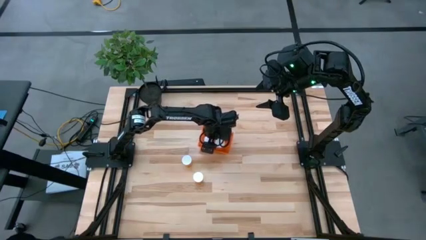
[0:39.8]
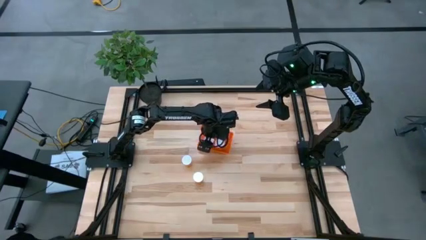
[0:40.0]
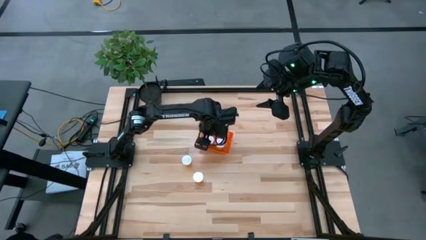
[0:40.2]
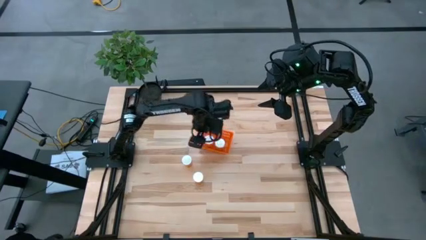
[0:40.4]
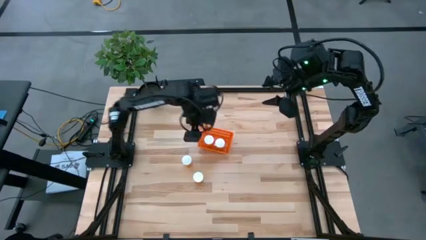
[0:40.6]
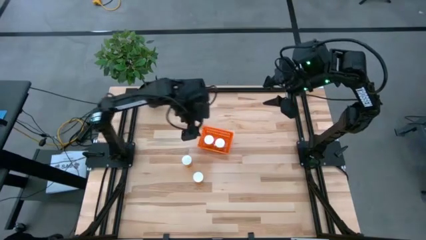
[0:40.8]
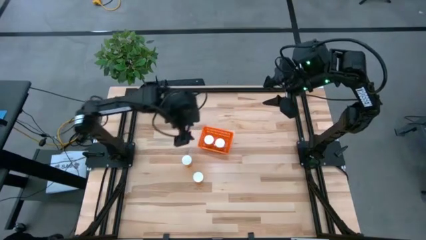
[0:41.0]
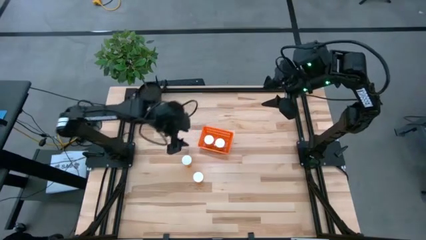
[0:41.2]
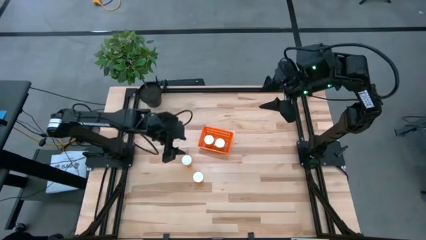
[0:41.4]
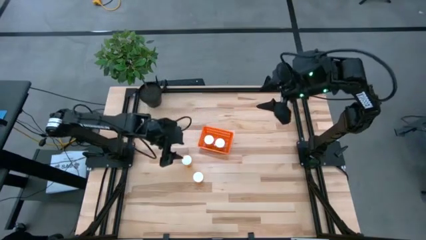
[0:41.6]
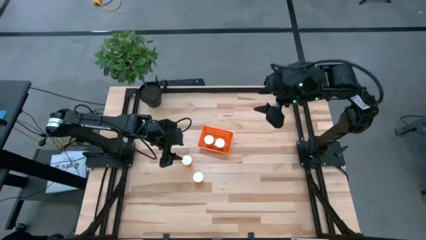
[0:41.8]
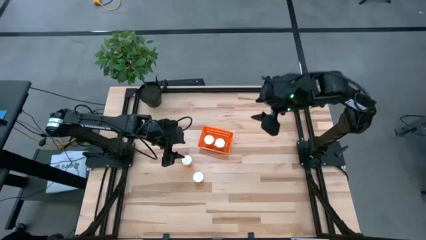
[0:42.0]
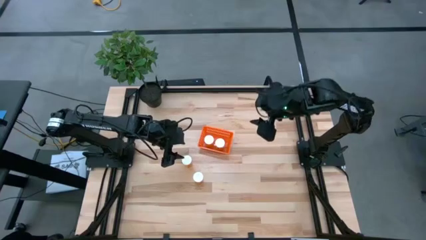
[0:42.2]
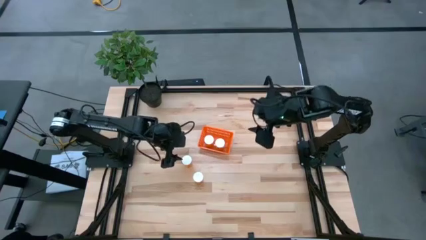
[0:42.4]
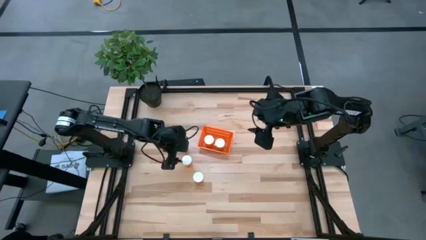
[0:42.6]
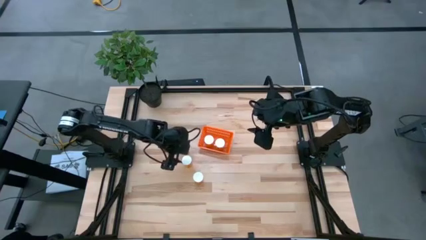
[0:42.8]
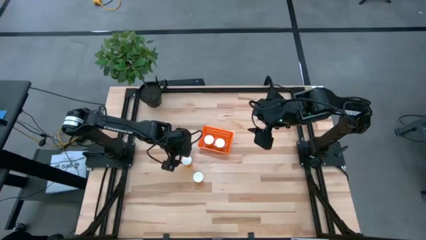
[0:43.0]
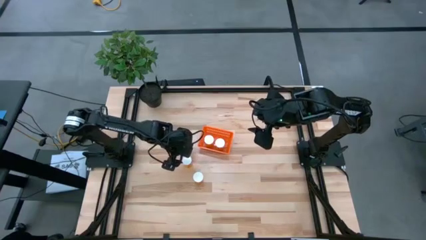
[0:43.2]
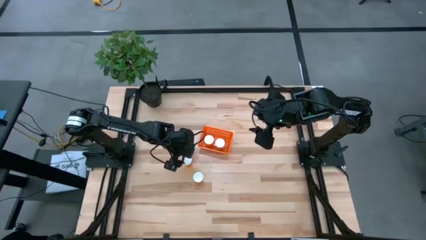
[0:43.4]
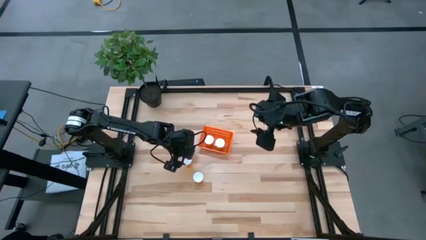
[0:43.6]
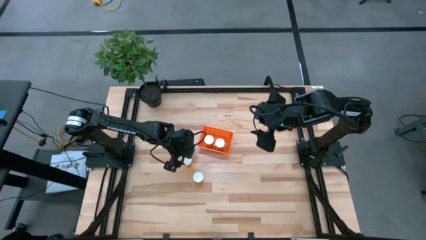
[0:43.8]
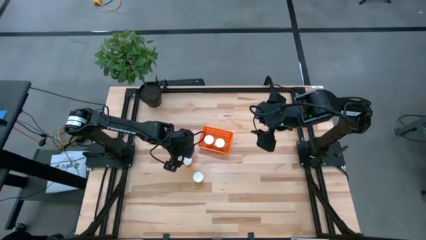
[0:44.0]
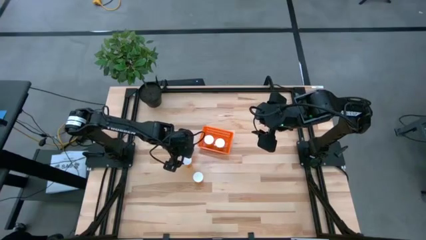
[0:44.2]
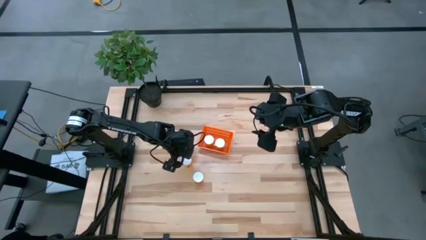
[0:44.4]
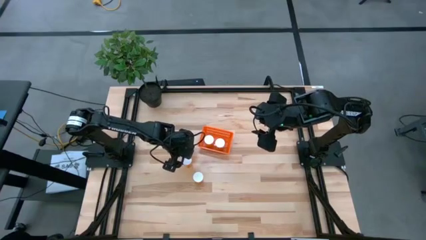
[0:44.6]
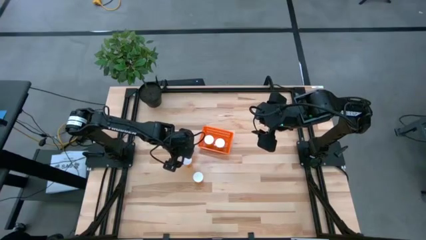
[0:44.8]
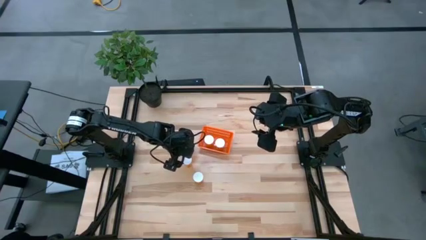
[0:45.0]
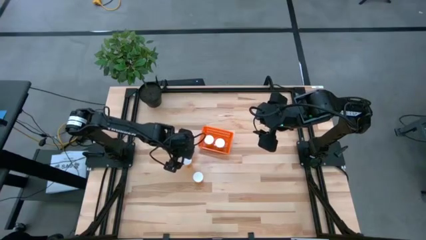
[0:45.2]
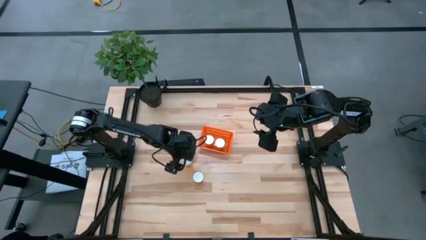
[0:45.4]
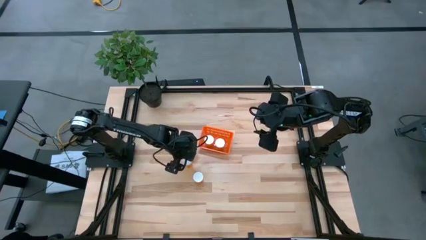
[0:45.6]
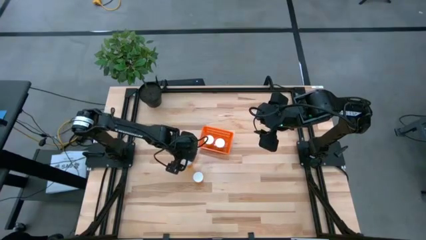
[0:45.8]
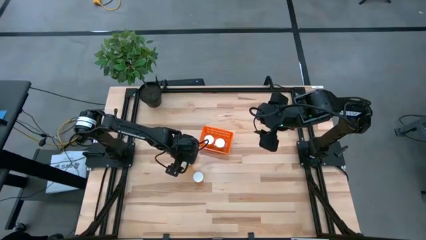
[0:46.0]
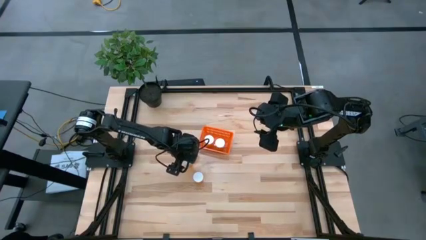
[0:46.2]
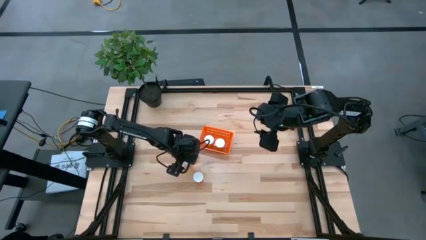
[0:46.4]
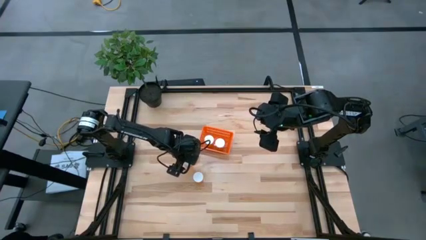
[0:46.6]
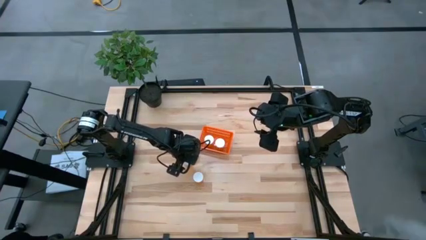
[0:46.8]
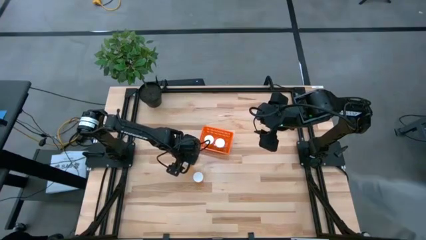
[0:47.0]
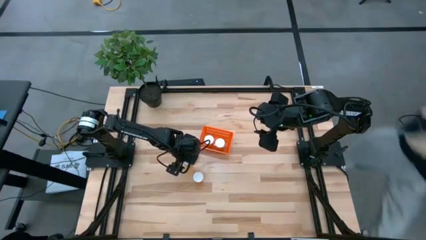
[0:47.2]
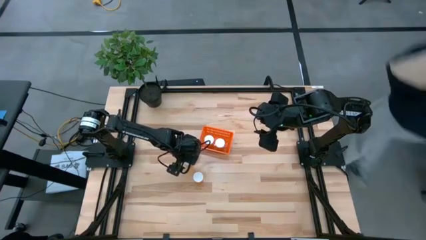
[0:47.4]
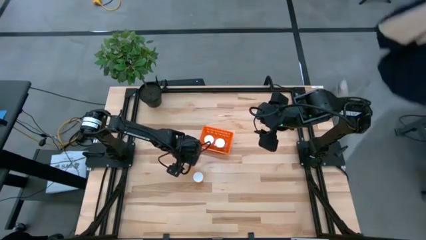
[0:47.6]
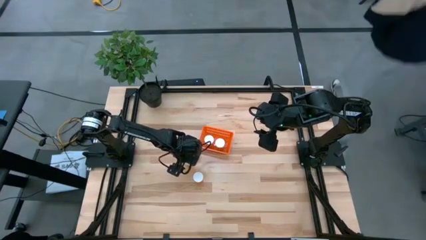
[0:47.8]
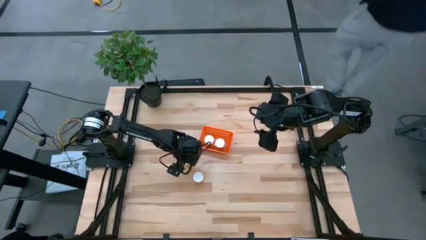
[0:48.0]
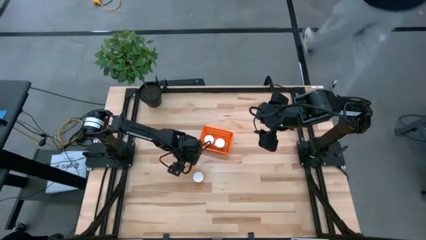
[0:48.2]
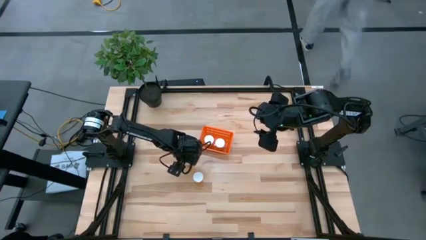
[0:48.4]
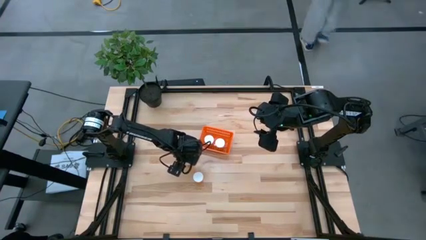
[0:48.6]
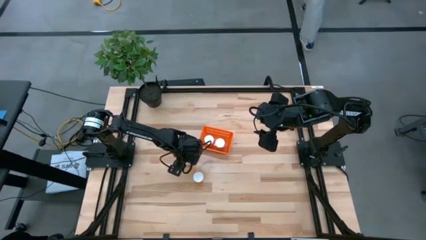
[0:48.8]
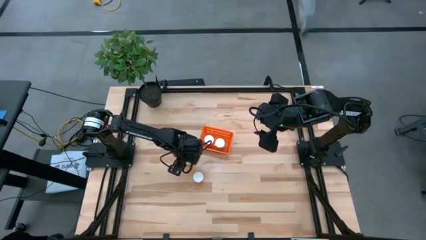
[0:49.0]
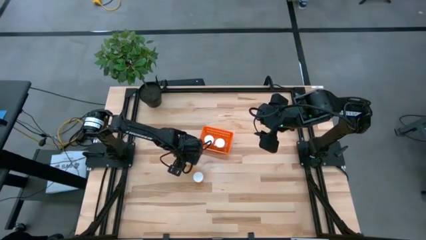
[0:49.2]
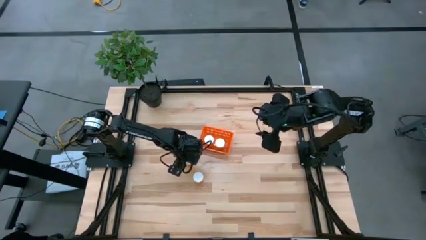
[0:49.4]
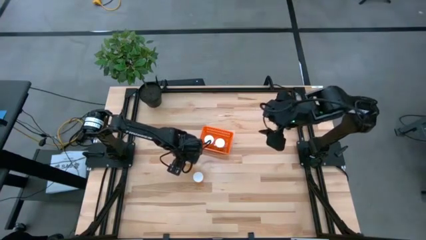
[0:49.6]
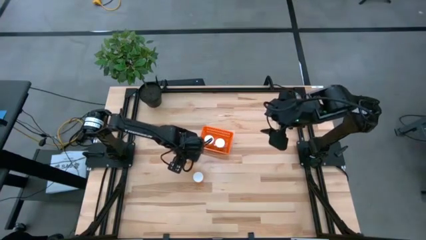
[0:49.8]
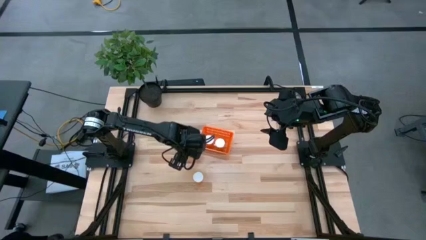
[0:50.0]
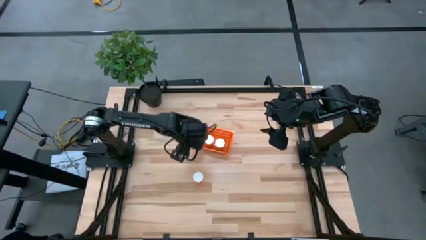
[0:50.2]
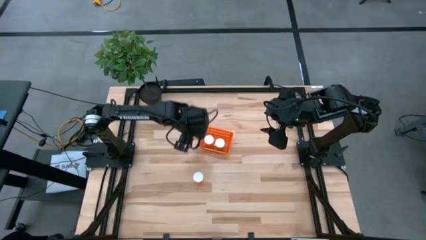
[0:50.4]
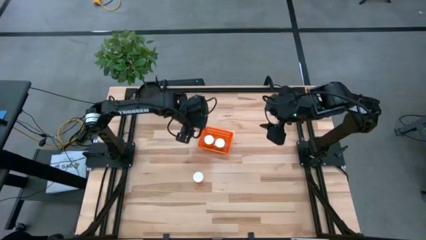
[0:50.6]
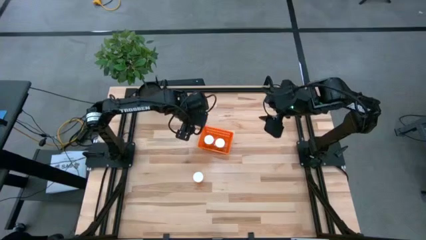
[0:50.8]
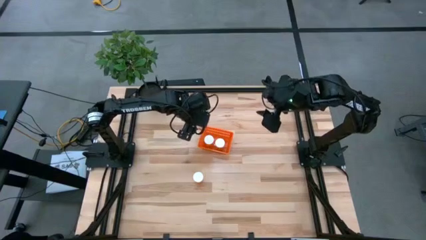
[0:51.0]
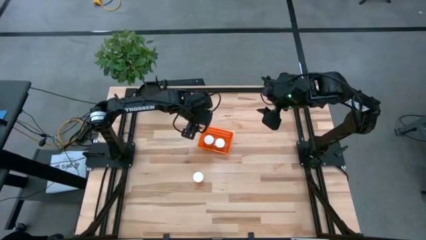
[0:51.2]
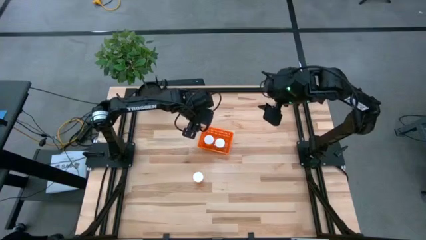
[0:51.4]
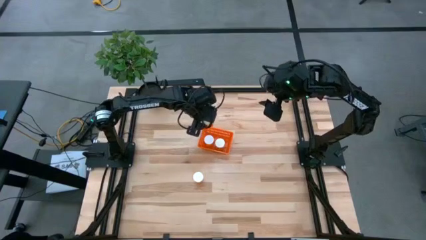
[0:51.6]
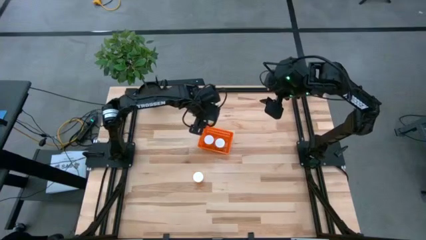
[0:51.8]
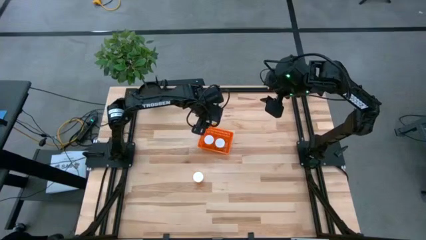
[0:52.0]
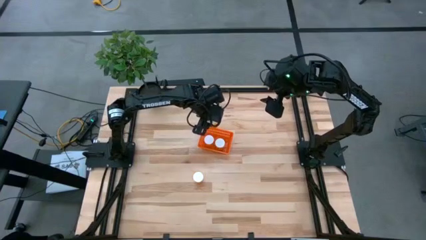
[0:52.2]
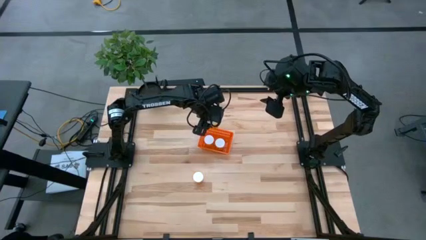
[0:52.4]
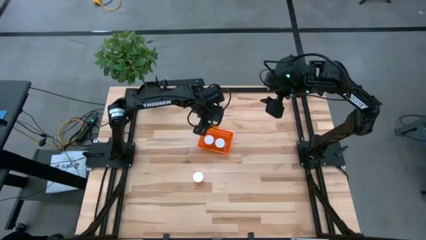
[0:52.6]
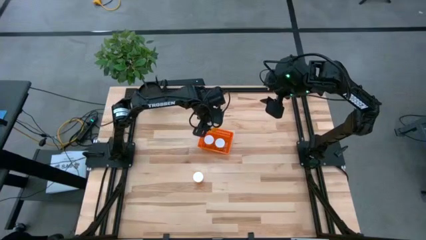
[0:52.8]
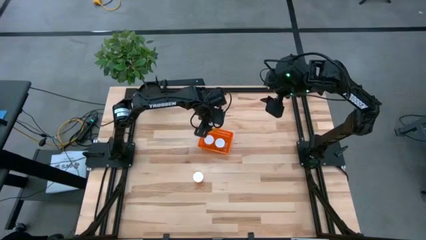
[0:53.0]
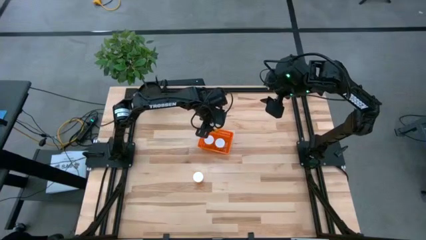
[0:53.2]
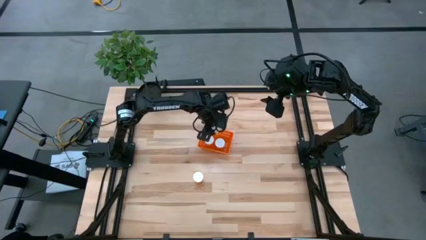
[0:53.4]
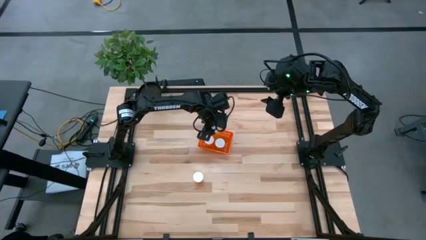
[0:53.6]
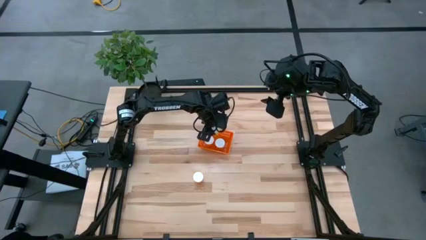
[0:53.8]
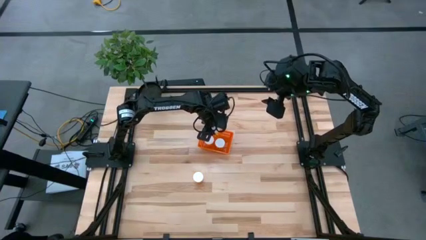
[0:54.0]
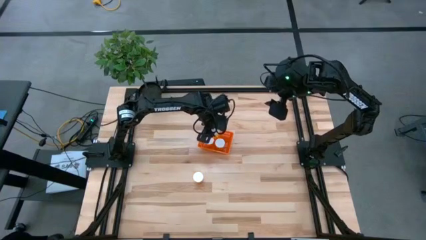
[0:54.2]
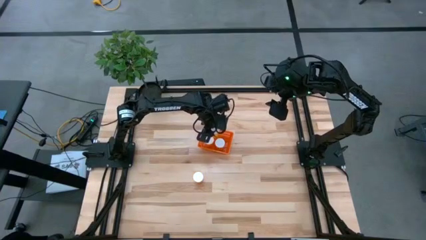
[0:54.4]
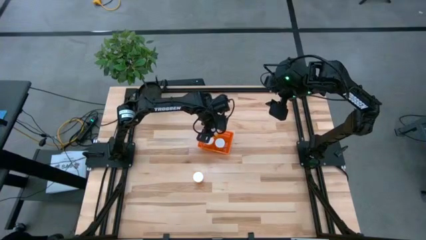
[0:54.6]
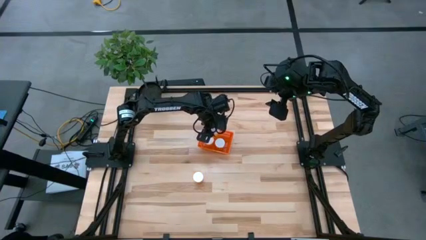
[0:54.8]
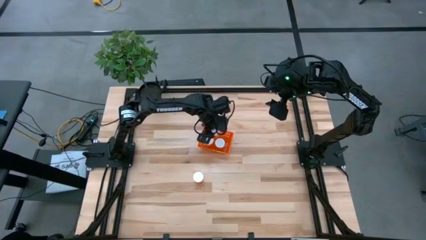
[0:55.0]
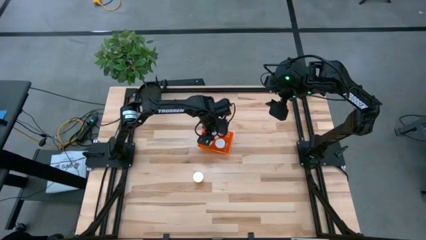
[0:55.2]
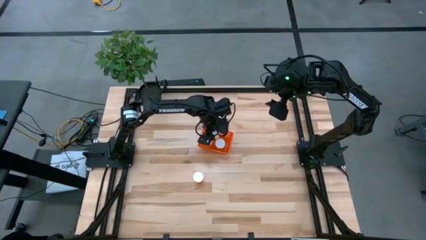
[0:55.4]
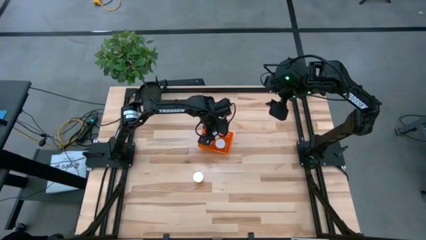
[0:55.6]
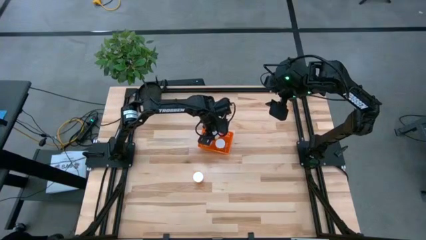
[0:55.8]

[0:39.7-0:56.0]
Task: Pick and place pill bottles into a basket
Put the orange pill bottle into the orange basket

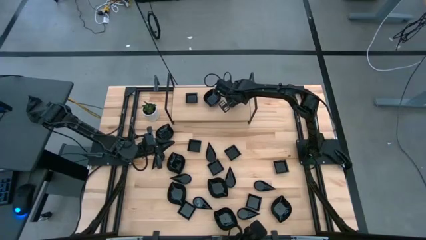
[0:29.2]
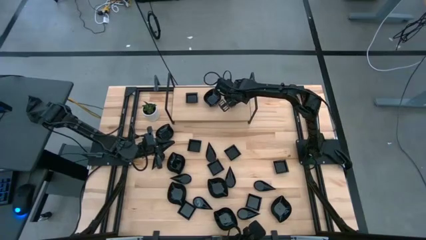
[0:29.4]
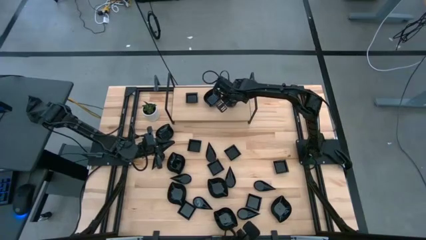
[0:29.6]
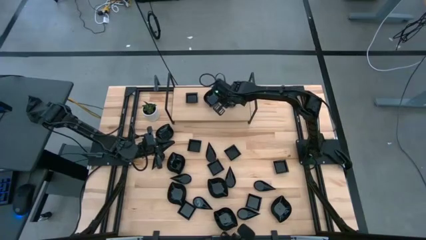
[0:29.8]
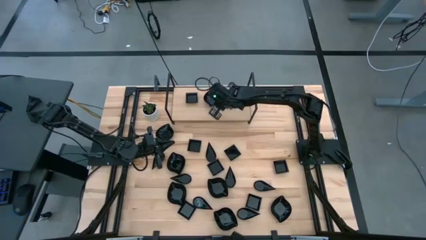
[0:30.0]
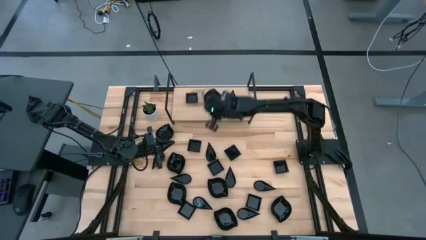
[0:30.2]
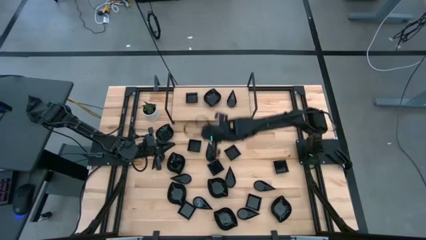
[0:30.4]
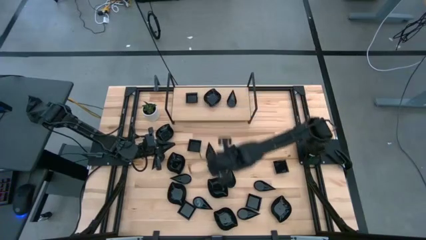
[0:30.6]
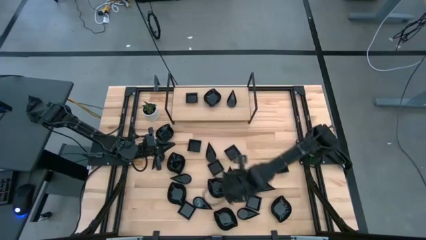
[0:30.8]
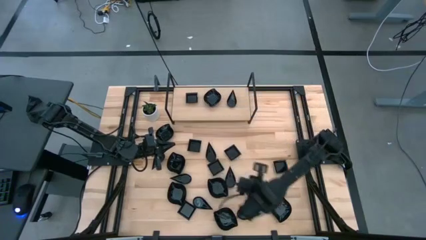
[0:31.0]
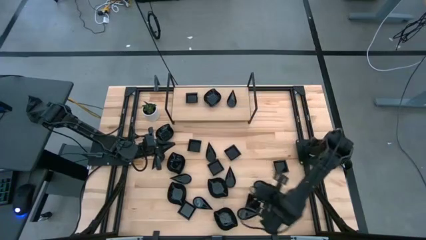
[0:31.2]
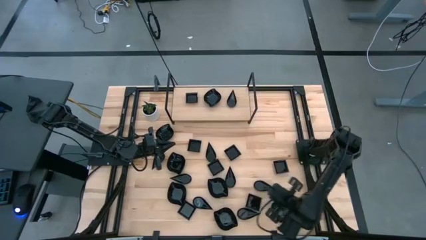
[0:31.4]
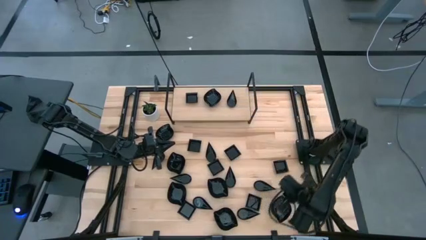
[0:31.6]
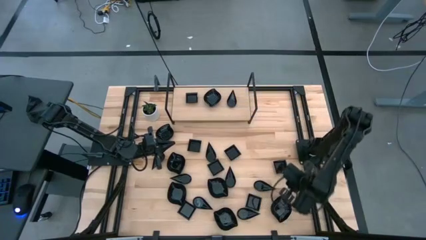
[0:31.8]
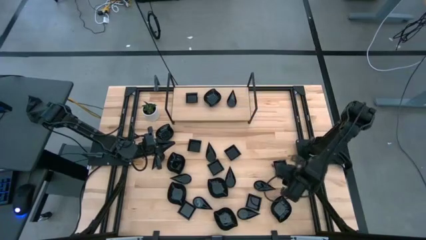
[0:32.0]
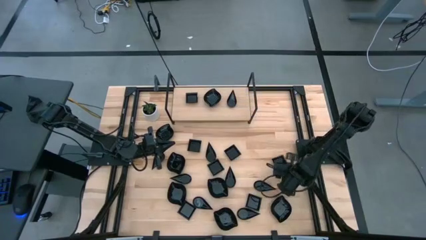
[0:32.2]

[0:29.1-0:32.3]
Task: Pick & Place Mini shaped plates
Stack the black square bowl on top of the other black square bowl on the shelf
